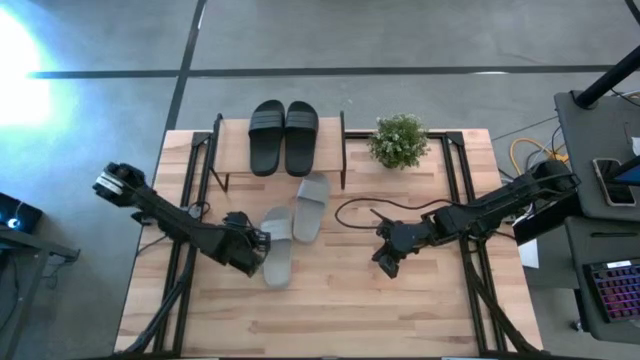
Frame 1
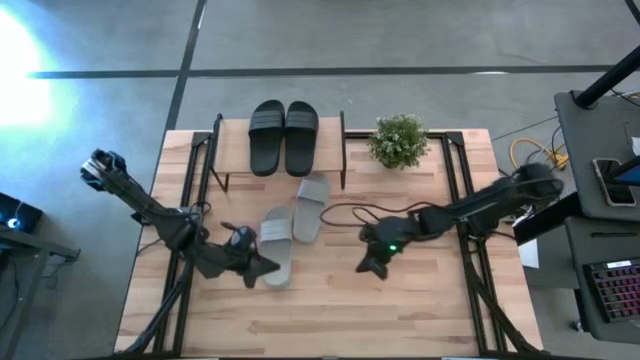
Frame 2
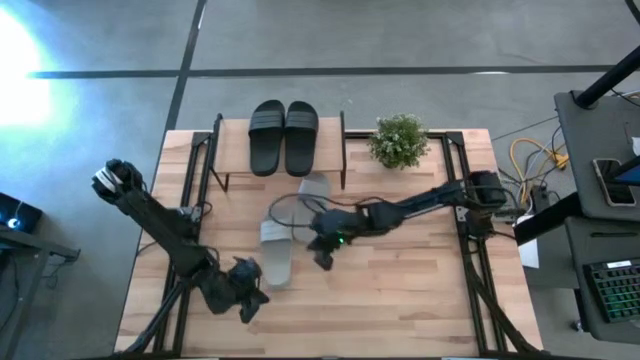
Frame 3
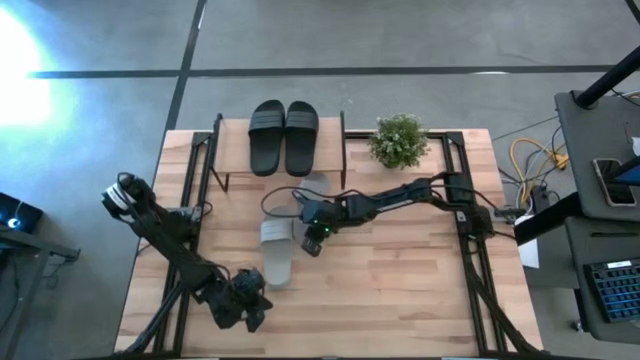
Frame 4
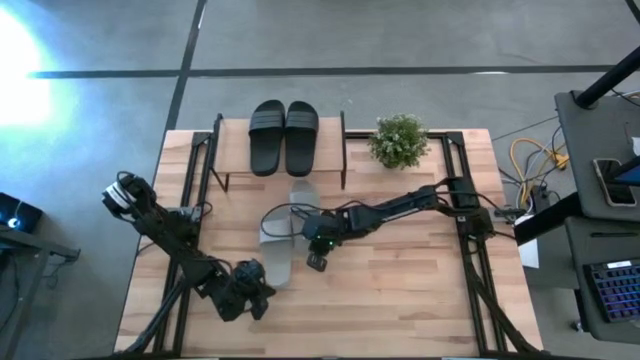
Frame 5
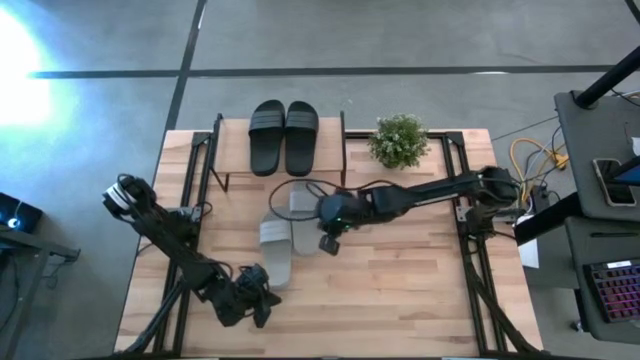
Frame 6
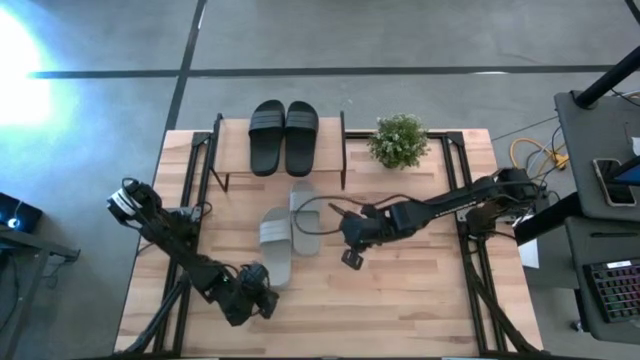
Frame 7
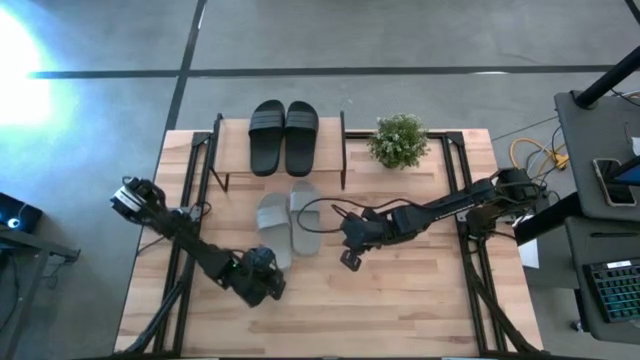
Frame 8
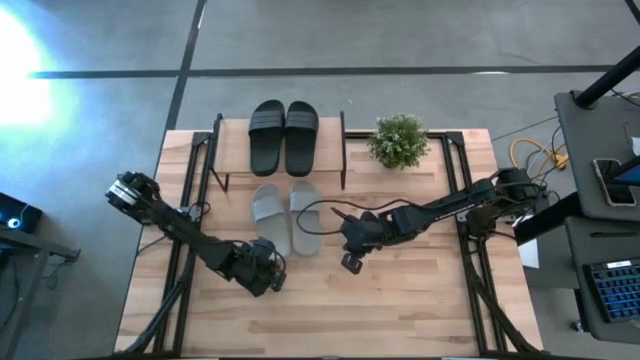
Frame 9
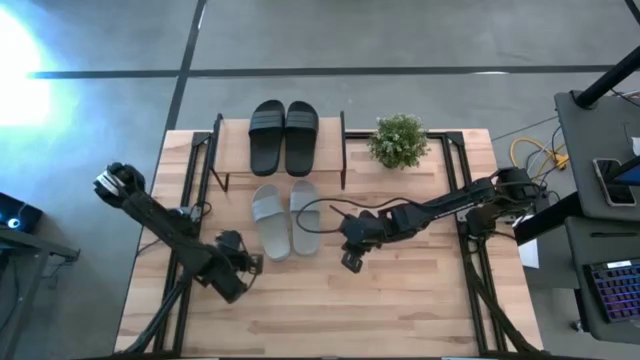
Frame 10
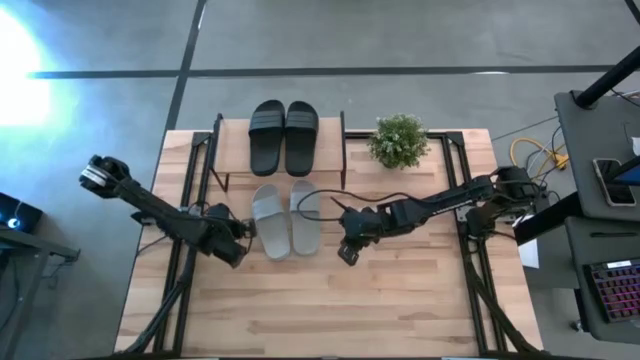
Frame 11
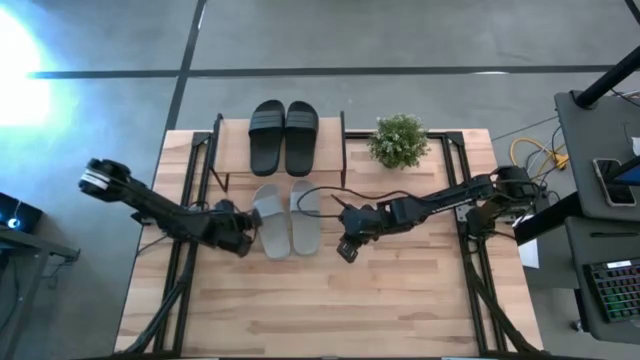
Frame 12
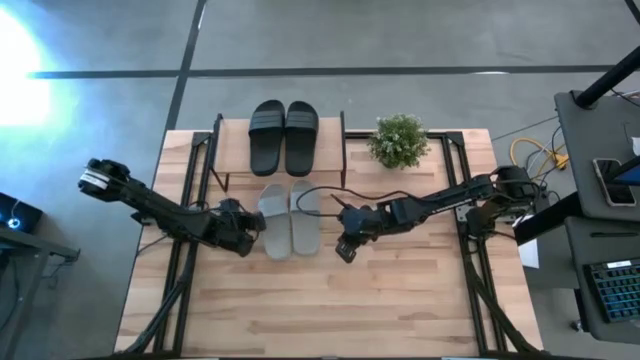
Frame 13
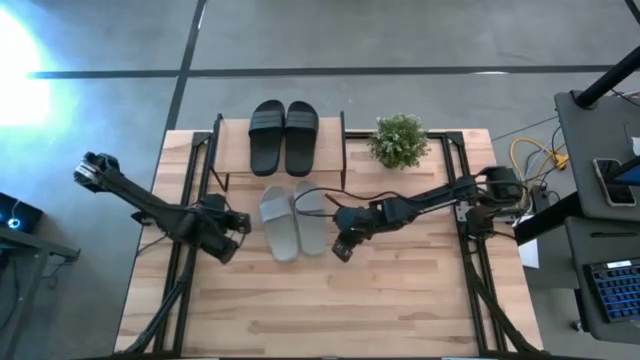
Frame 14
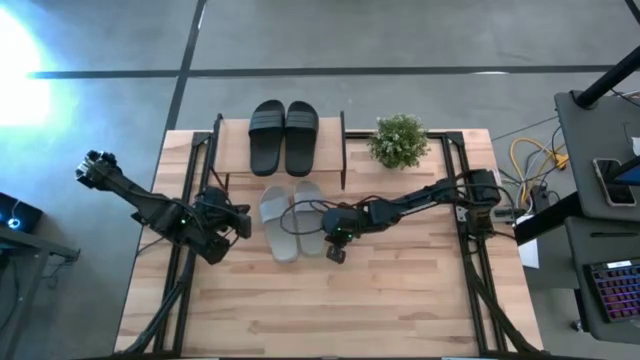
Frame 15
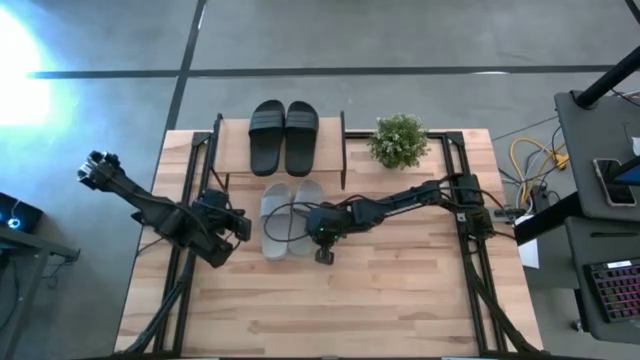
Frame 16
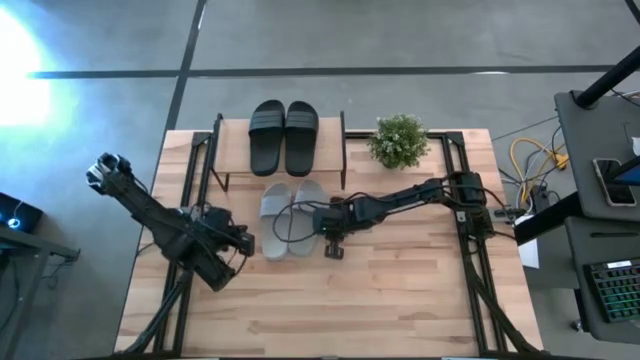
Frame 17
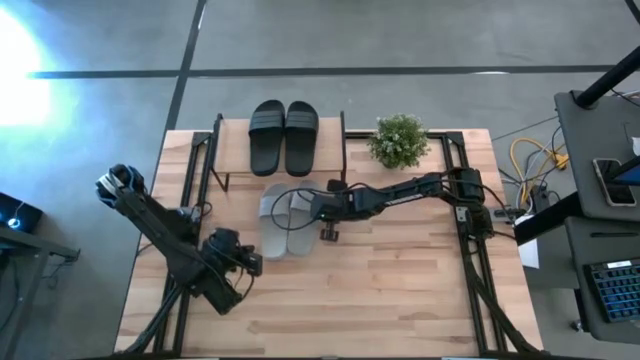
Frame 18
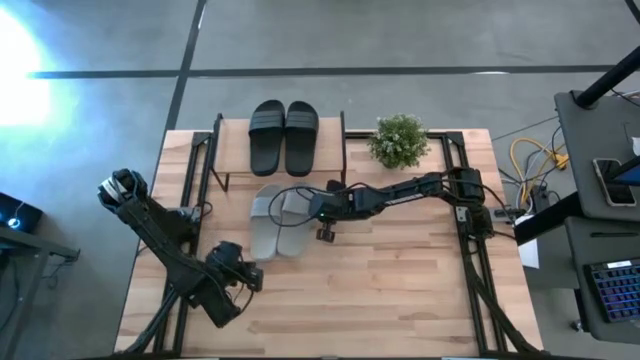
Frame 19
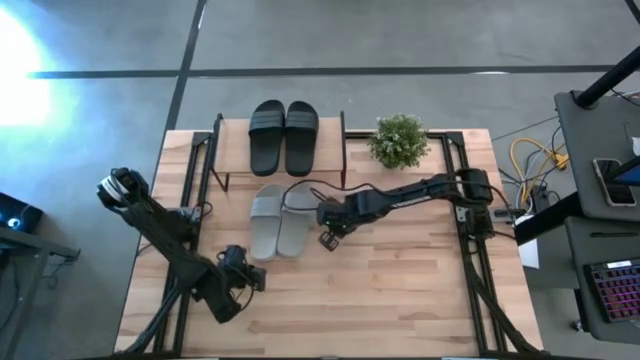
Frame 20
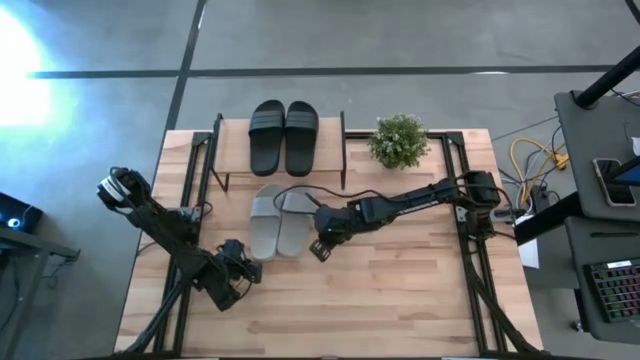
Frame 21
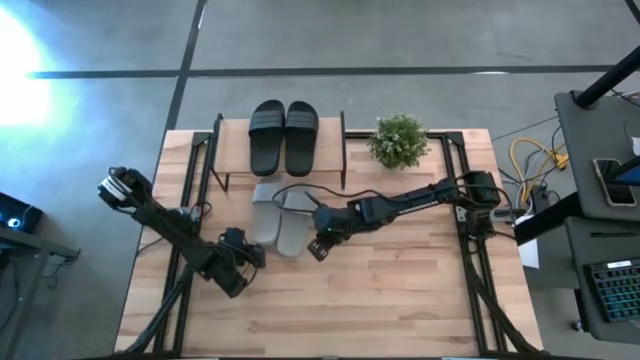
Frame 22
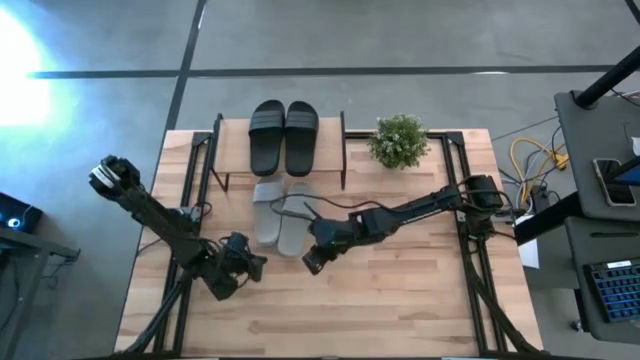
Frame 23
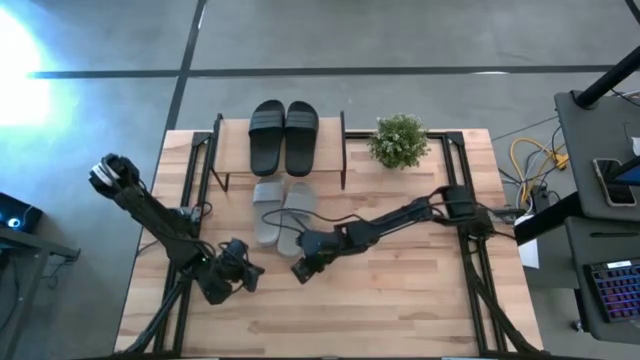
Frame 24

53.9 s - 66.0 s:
Task: Pick and place slides into the shelf
Adjust the pair of grey slippers

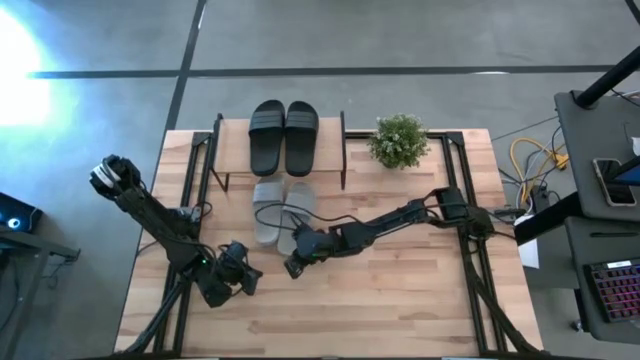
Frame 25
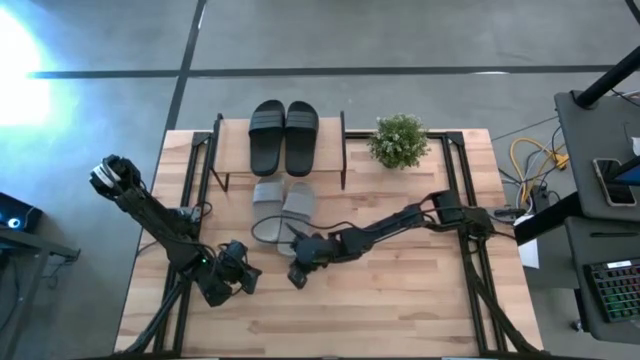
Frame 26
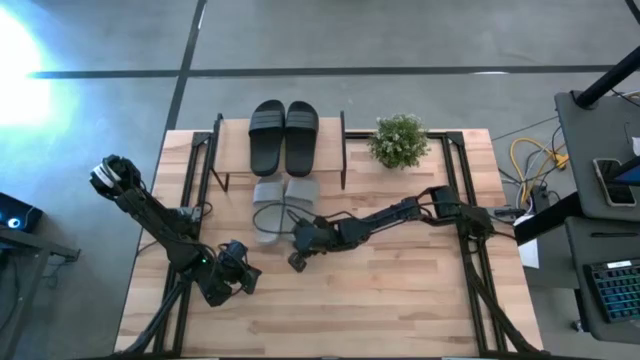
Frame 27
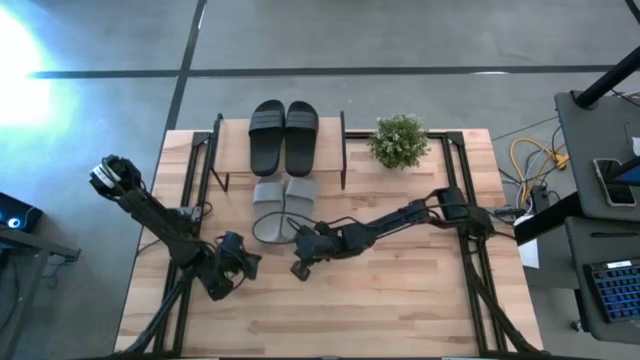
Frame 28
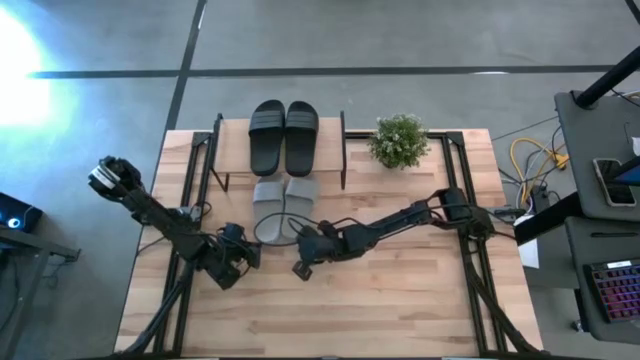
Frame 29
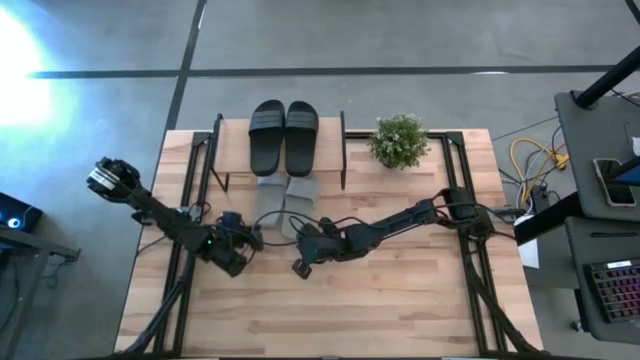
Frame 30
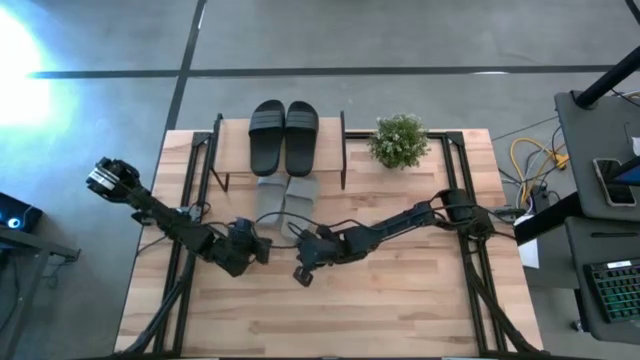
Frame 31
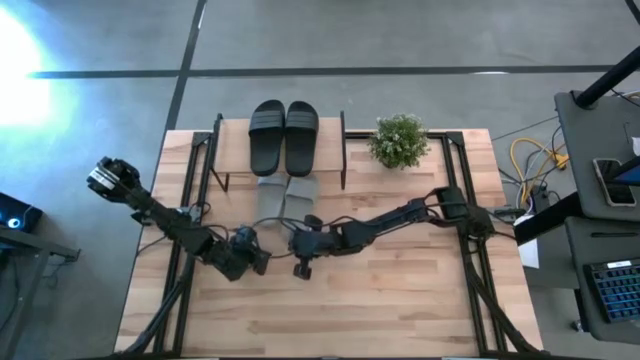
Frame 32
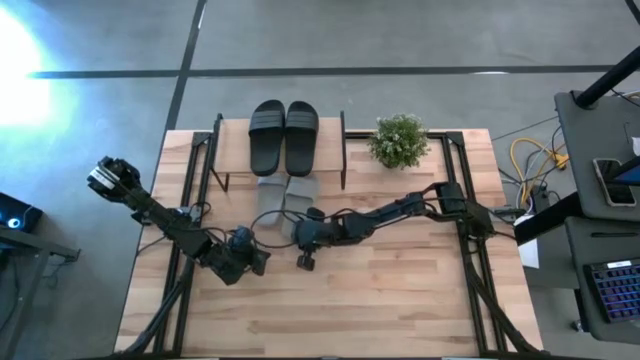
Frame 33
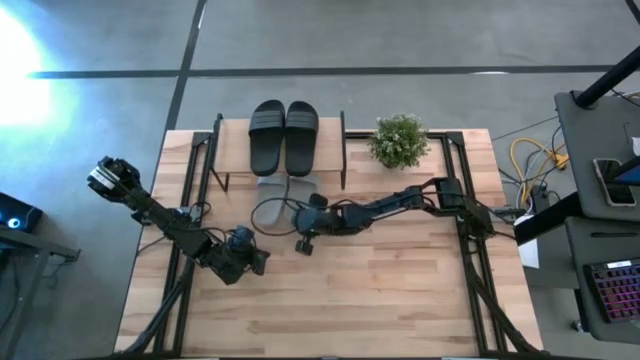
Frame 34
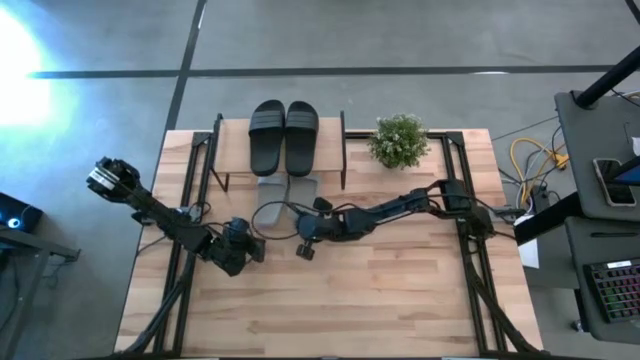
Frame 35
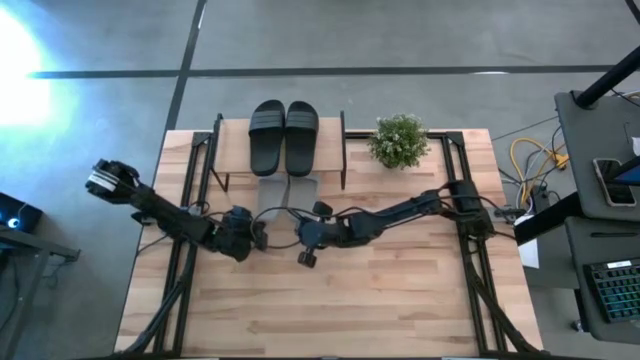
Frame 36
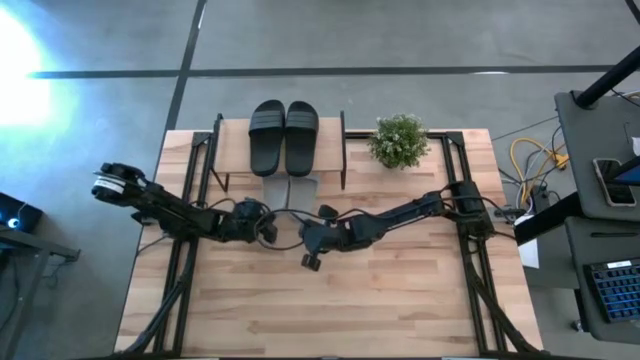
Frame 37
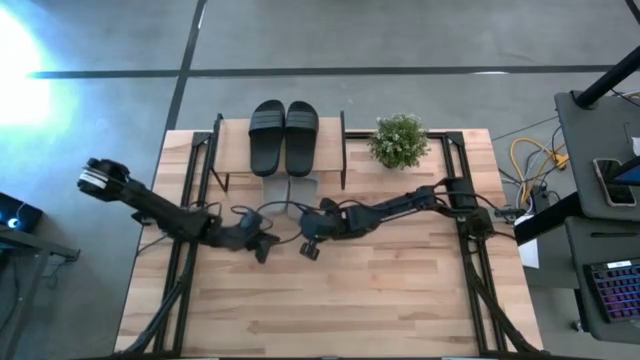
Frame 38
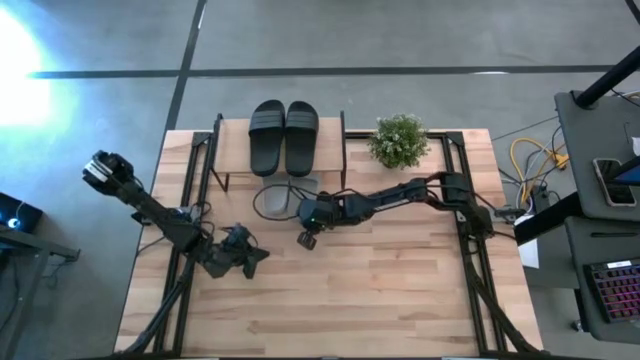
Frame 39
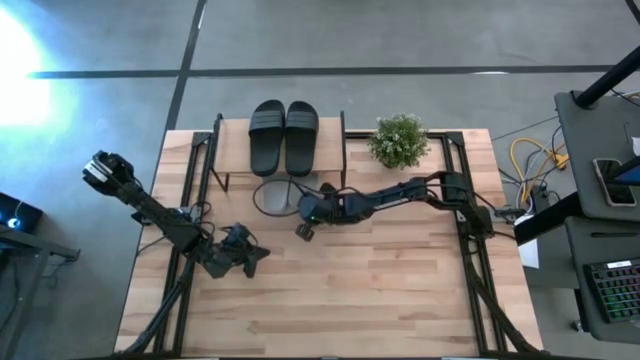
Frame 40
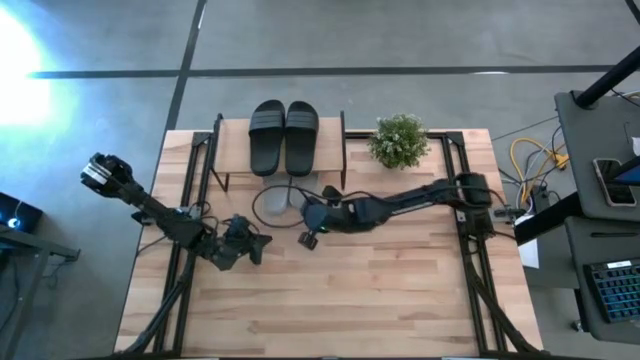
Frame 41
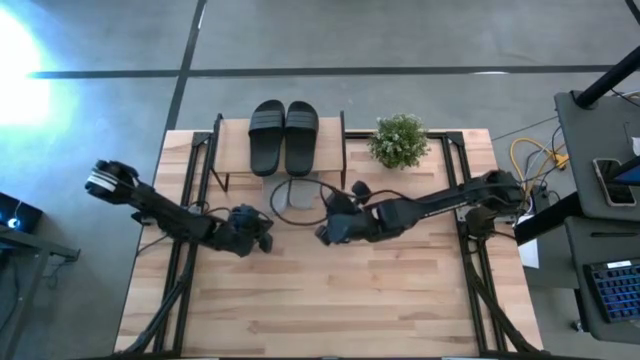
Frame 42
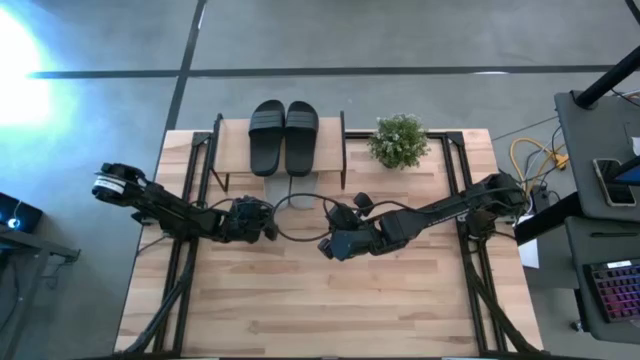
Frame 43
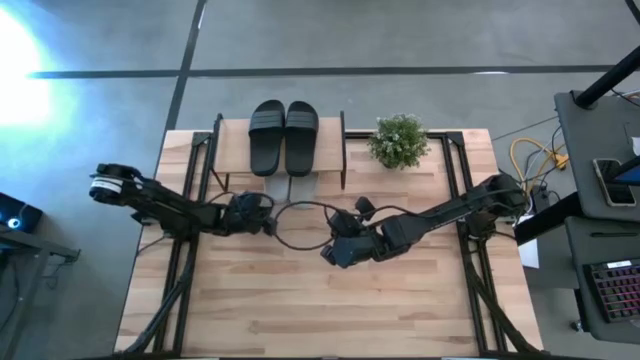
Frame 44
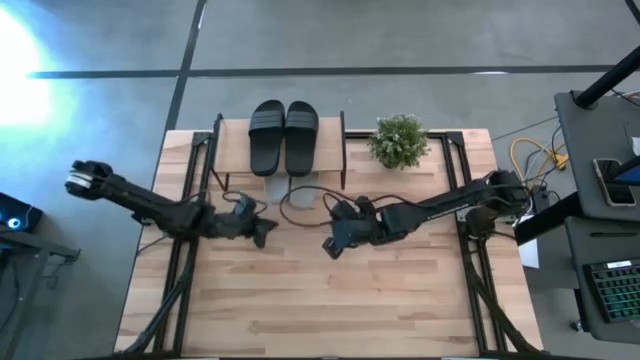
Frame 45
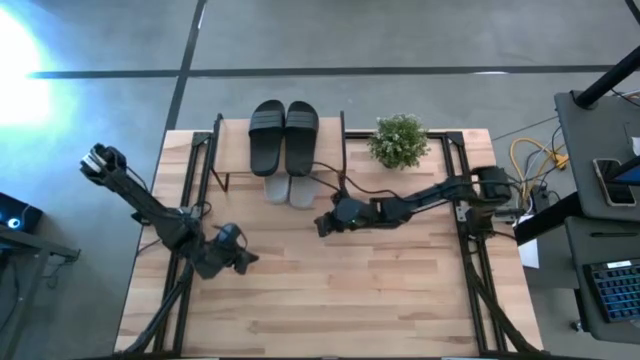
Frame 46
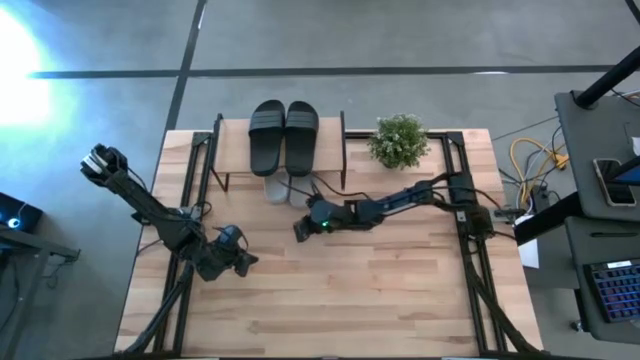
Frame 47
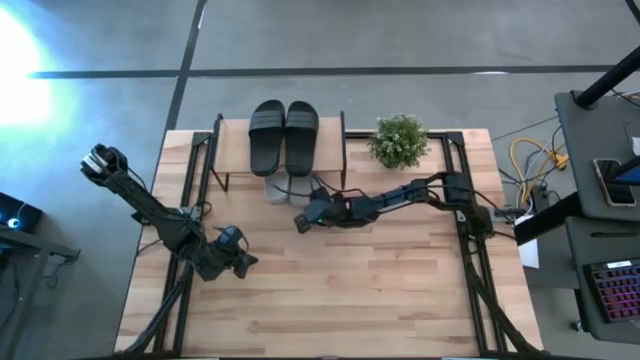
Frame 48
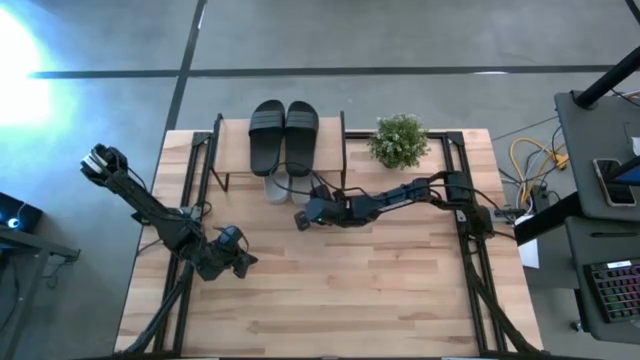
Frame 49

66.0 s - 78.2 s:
Adjust the pair of grey slippers
